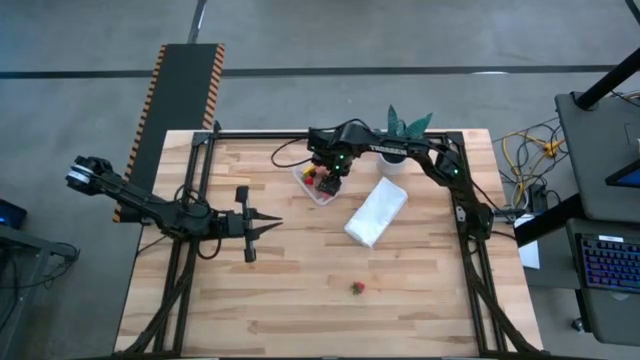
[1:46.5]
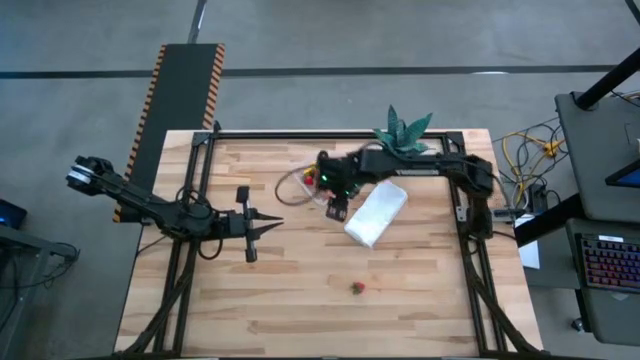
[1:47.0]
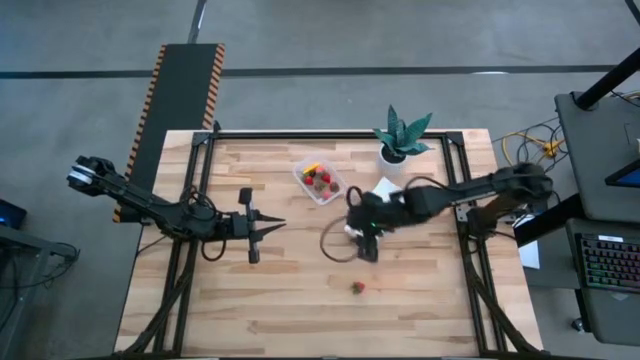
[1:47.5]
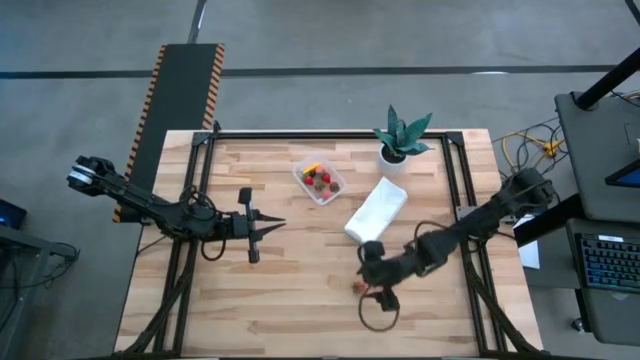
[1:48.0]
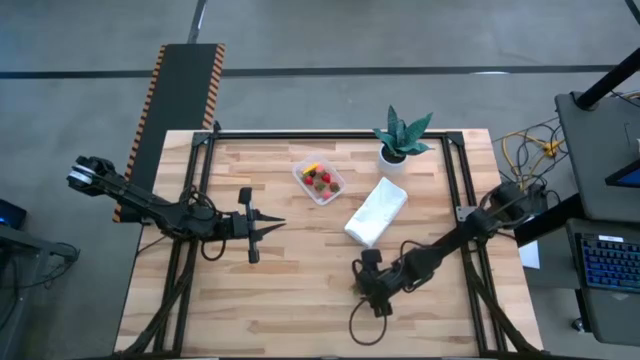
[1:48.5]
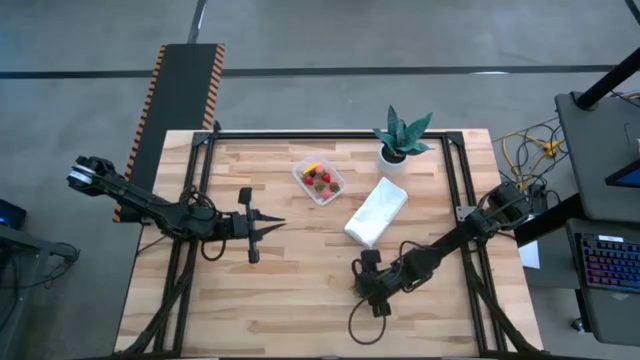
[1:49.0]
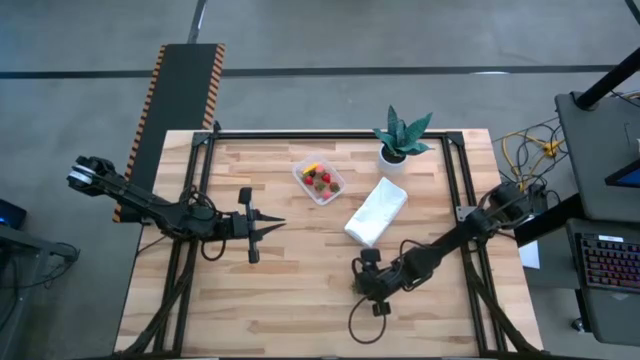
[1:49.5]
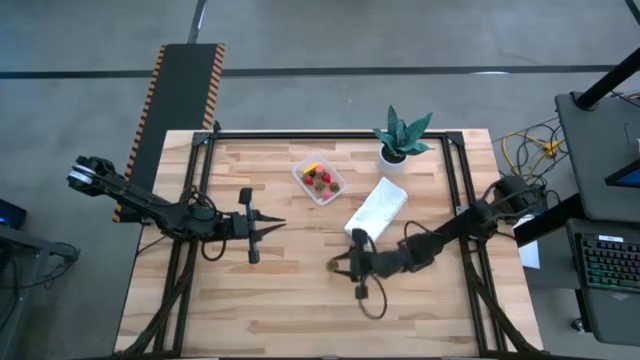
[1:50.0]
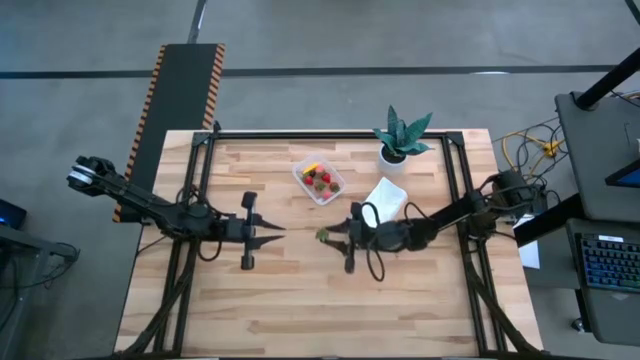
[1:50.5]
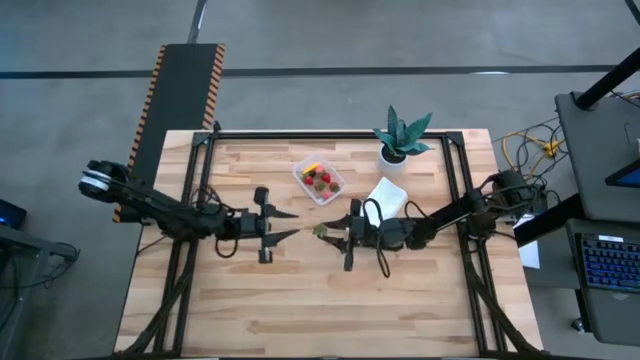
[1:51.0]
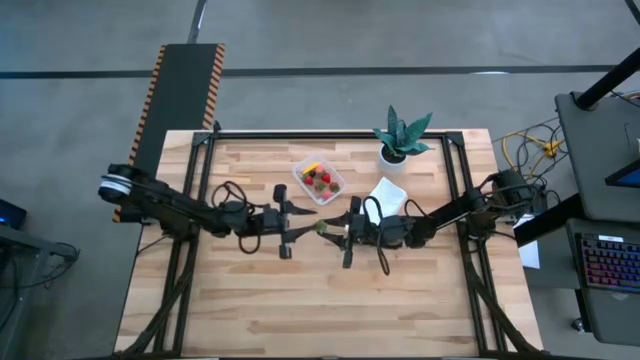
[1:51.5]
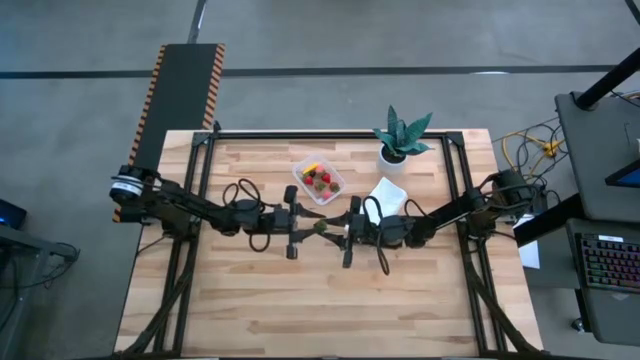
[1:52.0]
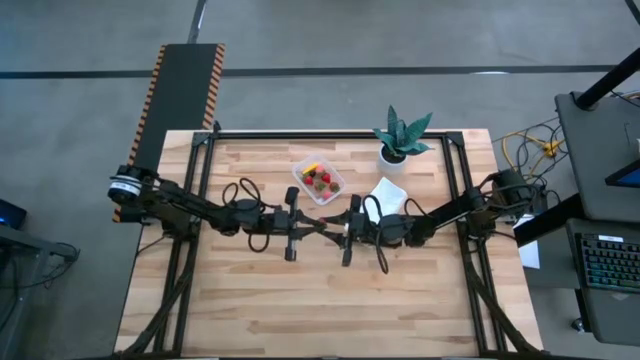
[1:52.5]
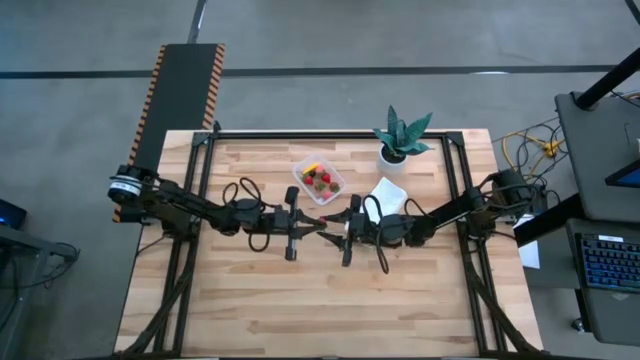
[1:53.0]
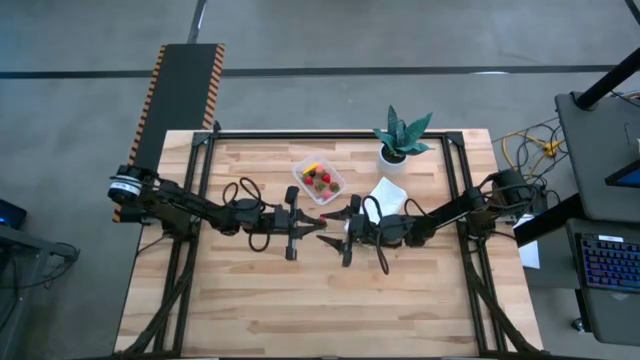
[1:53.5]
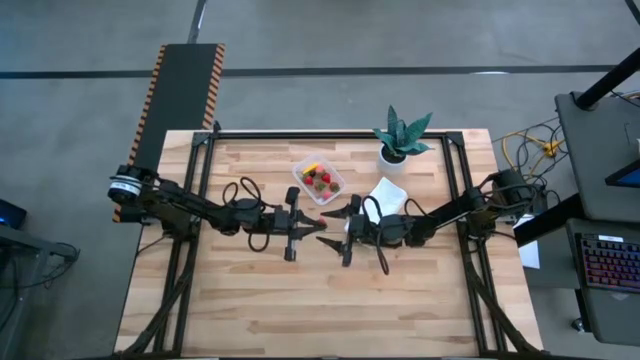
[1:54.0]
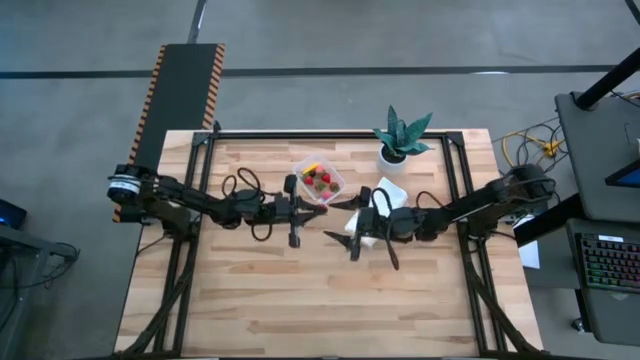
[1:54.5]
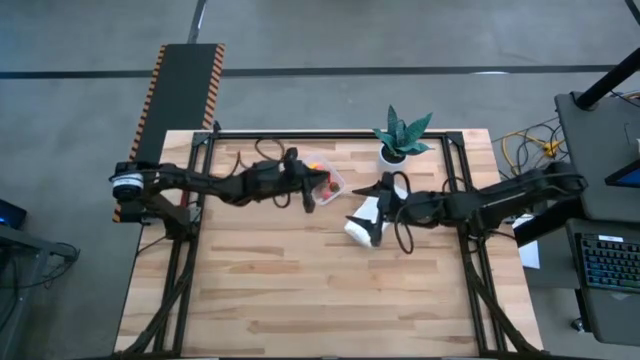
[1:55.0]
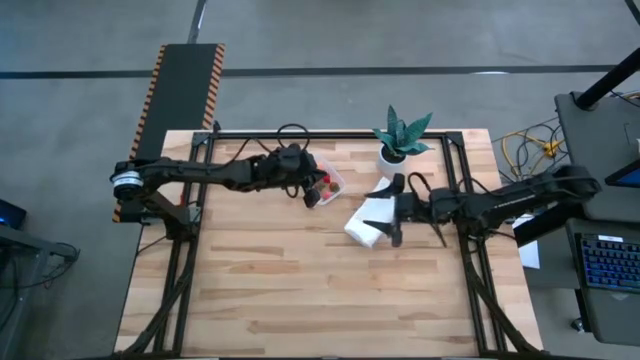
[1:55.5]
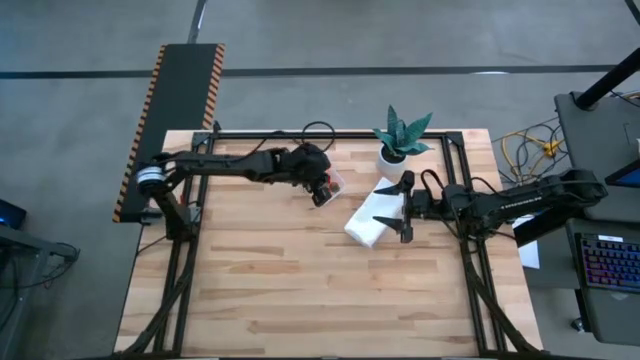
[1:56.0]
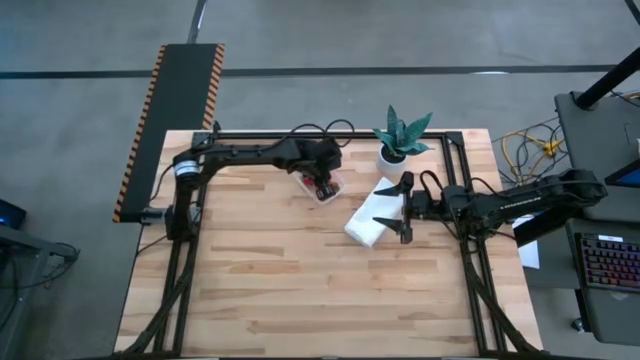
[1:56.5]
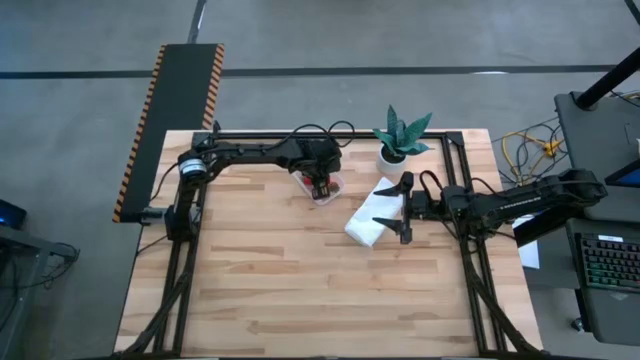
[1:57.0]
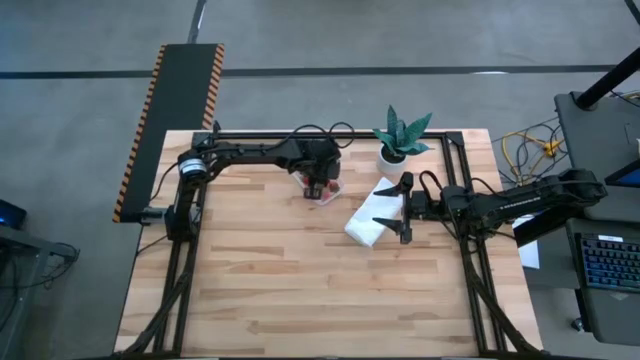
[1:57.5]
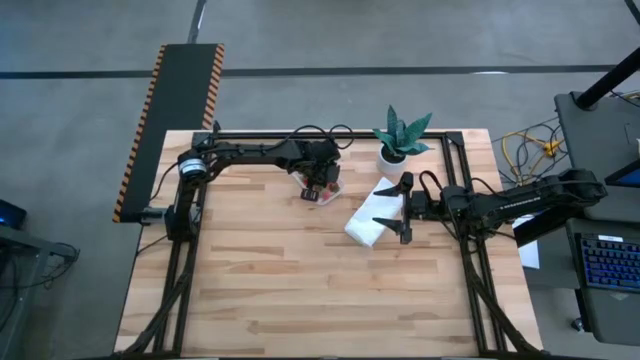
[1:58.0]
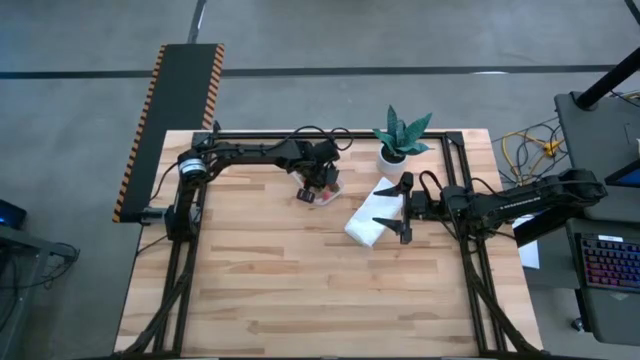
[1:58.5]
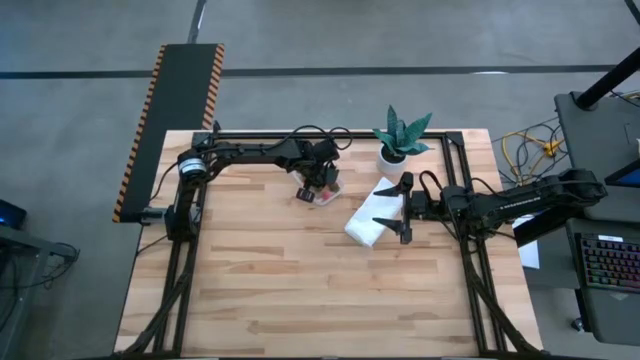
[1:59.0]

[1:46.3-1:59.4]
Task: Pick and placing Produce into tupperware
Put the strawberry into the transparent bin

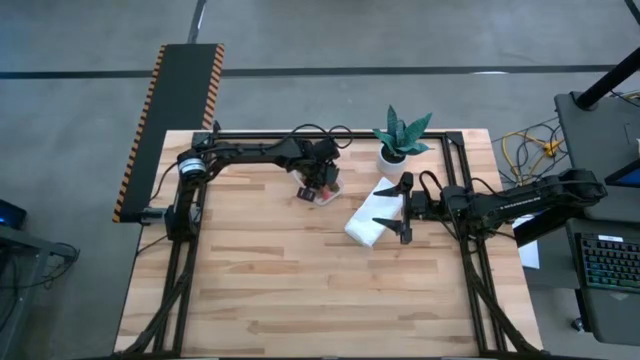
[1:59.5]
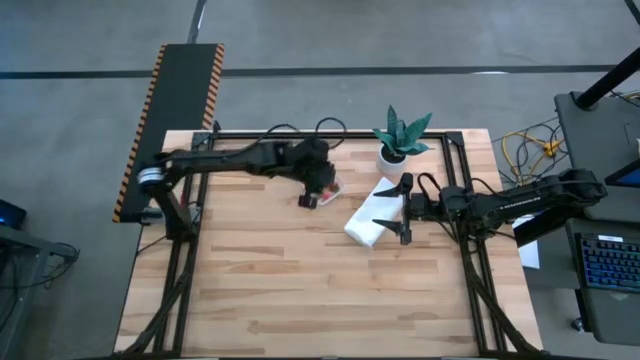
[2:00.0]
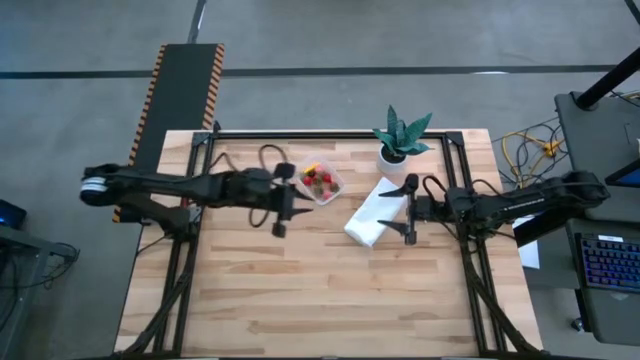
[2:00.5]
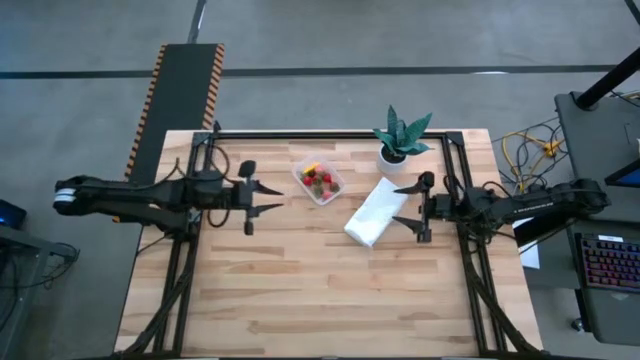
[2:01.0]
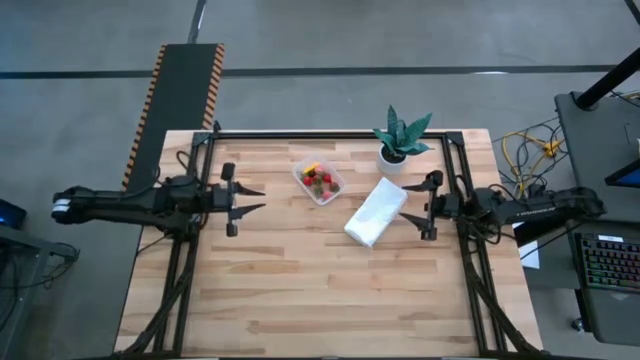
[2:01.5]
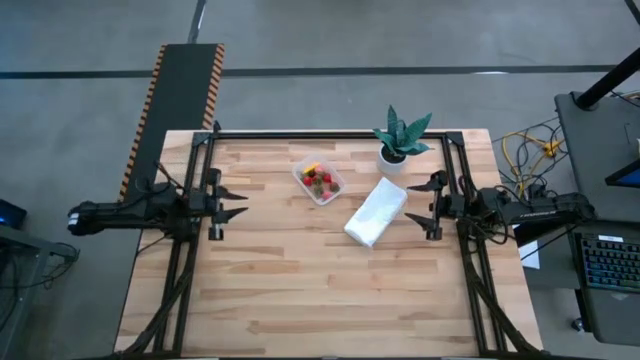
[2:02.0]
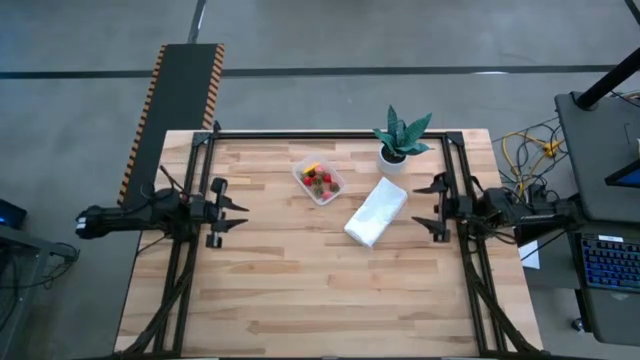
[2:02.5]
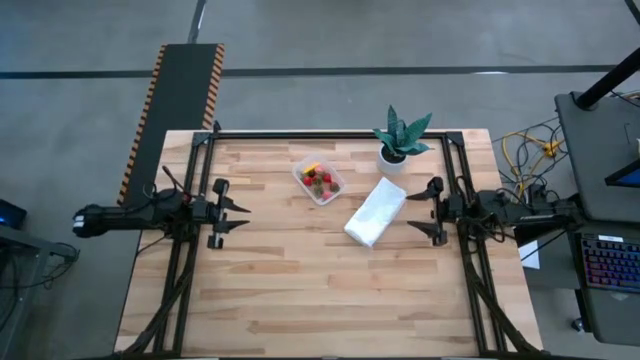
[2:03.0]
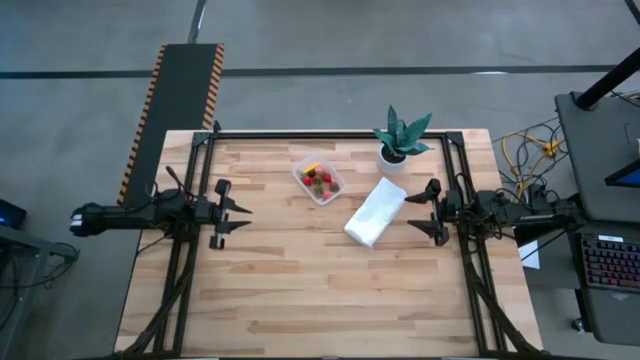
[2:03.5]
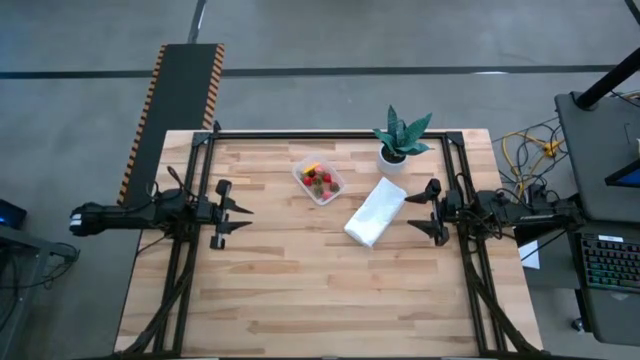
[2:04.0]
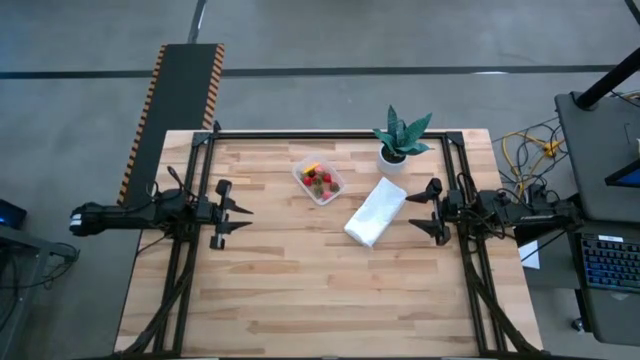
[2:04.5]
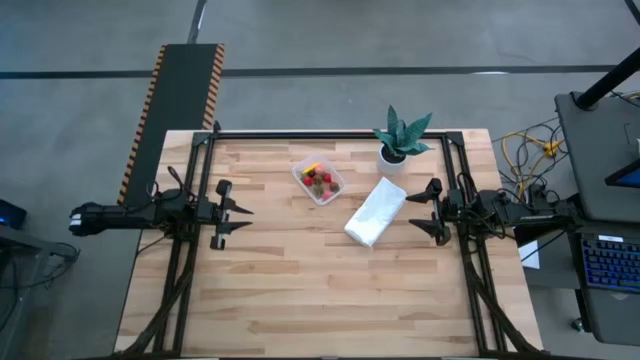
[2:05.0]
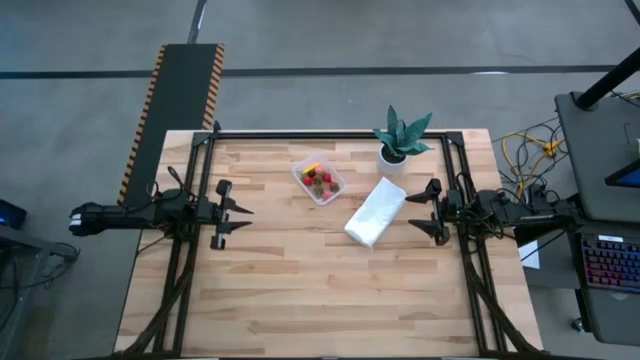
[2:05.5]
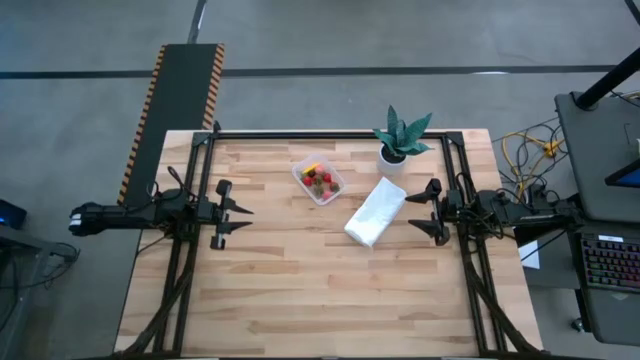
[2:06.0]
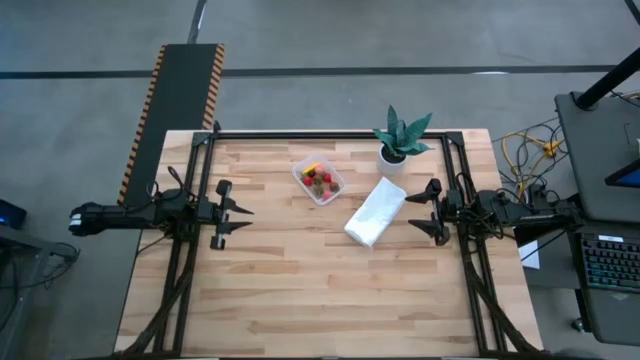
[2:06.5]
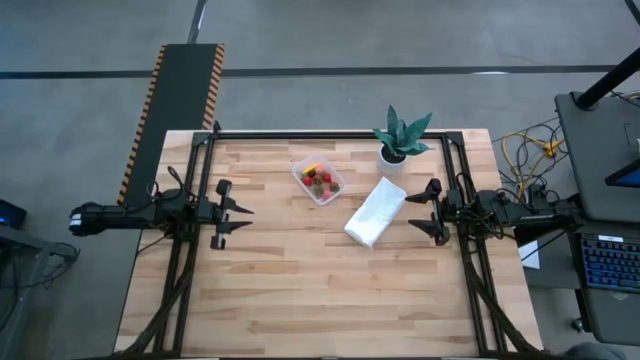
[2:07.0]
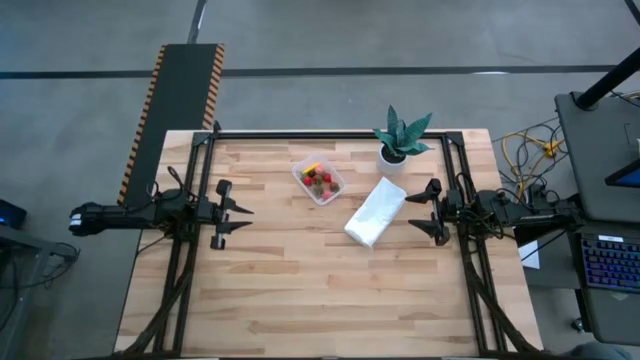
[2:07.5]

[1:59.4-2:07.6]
Return to Home Position
